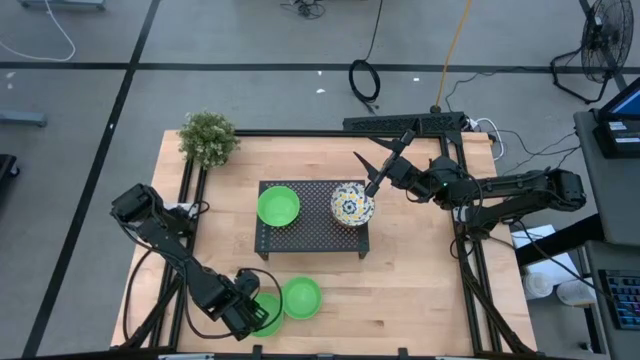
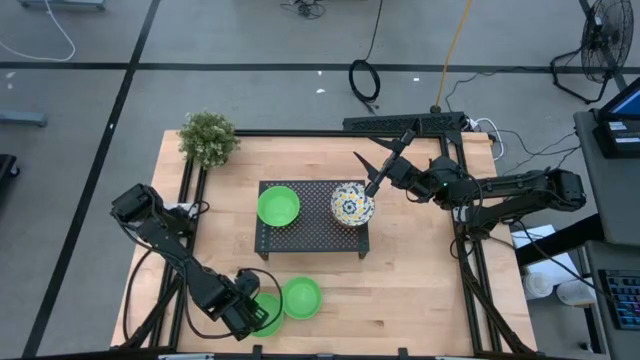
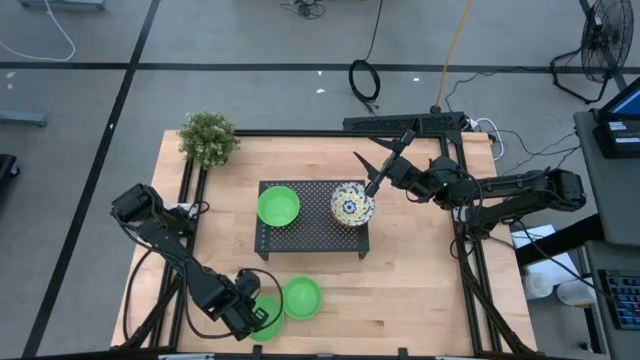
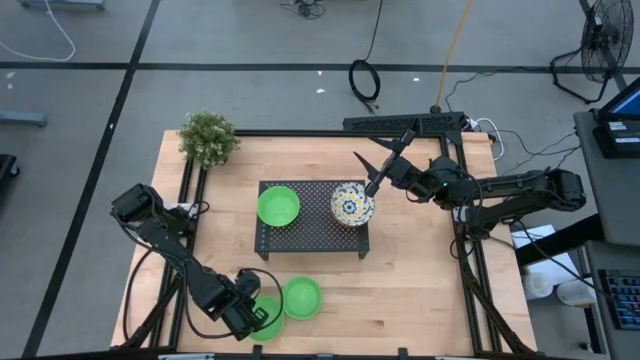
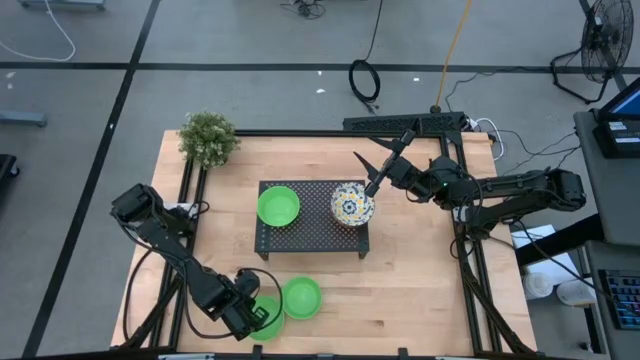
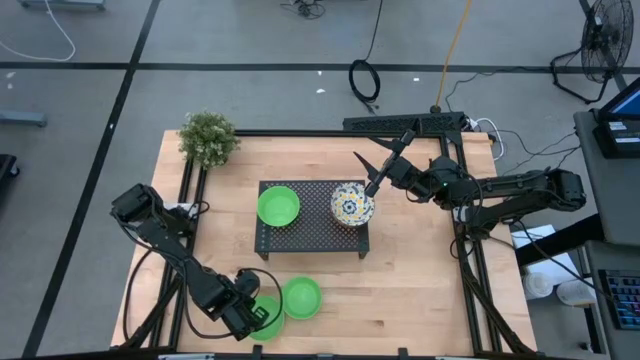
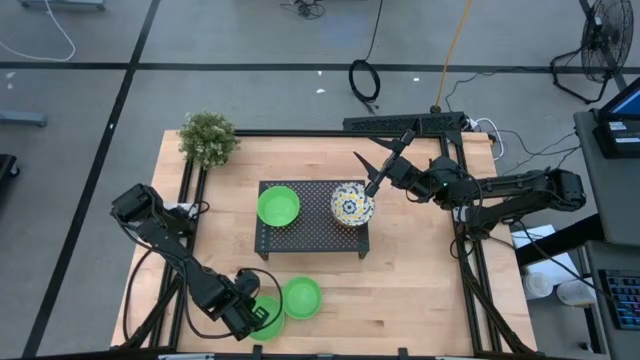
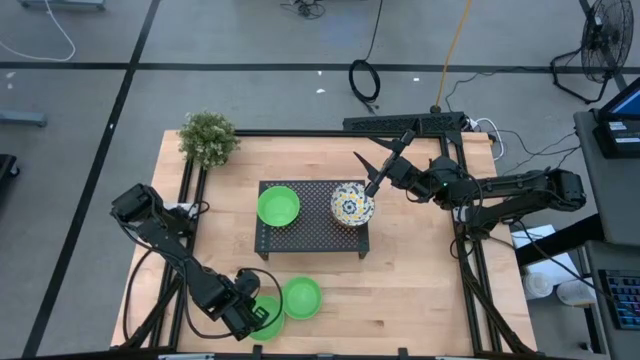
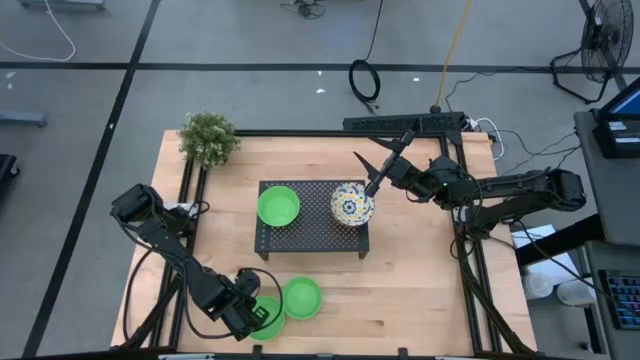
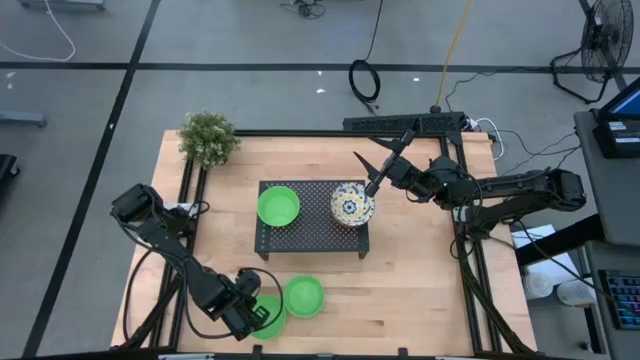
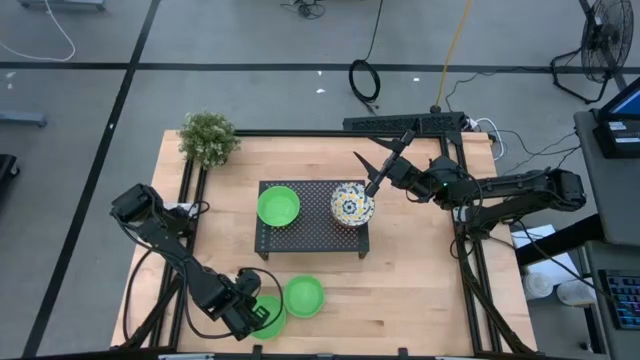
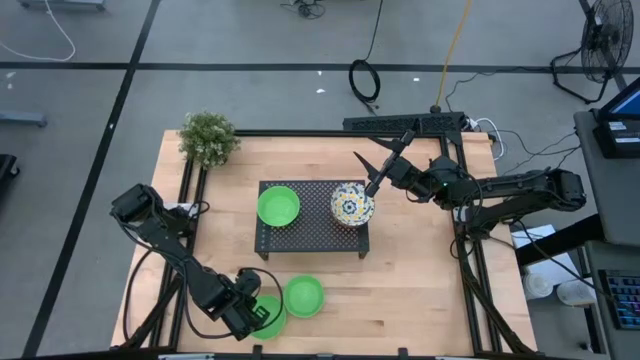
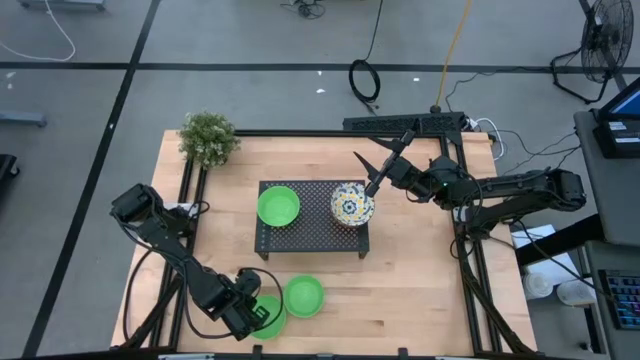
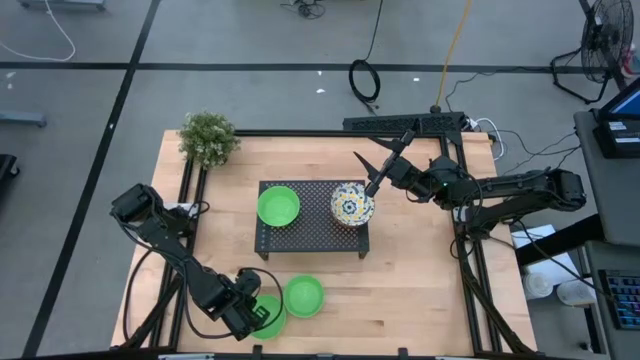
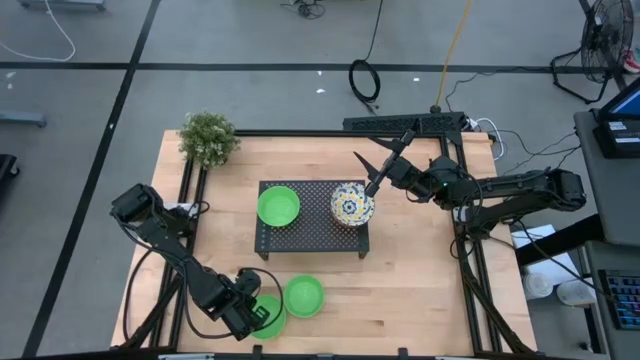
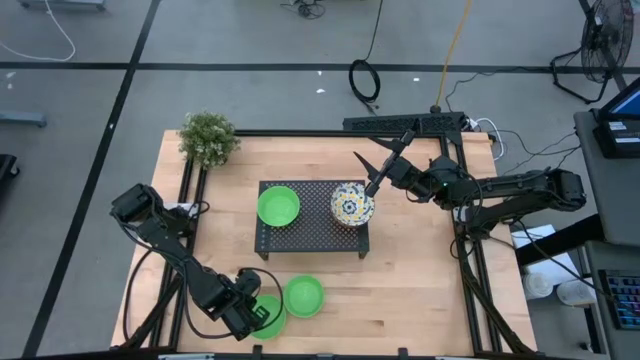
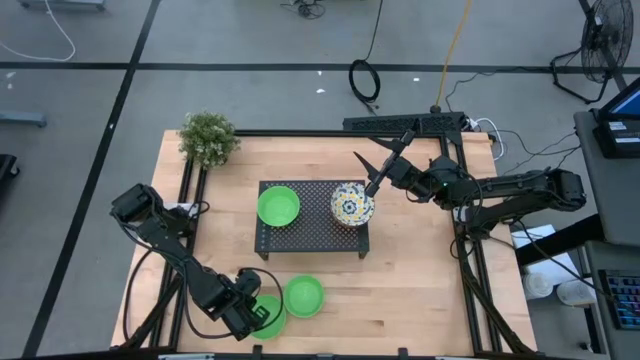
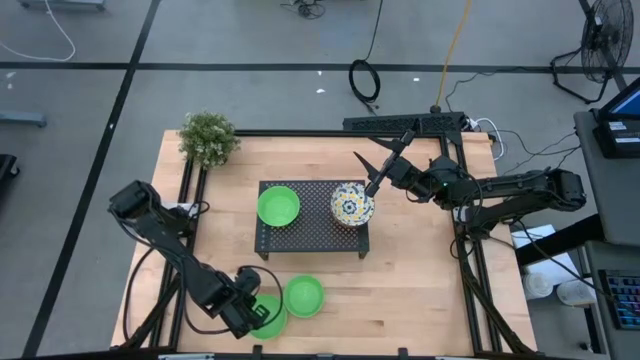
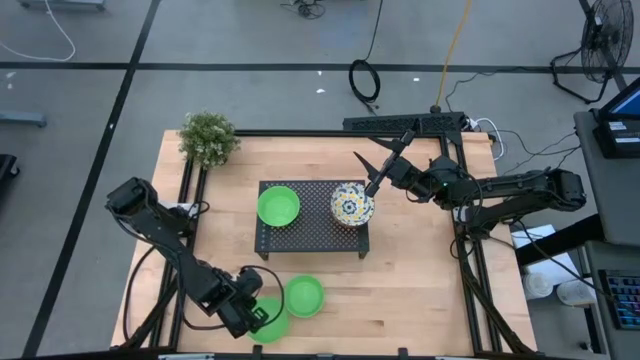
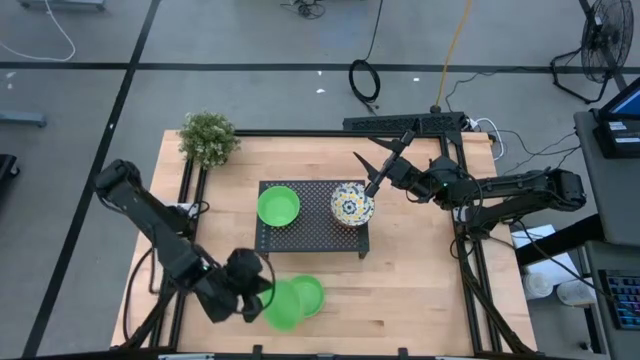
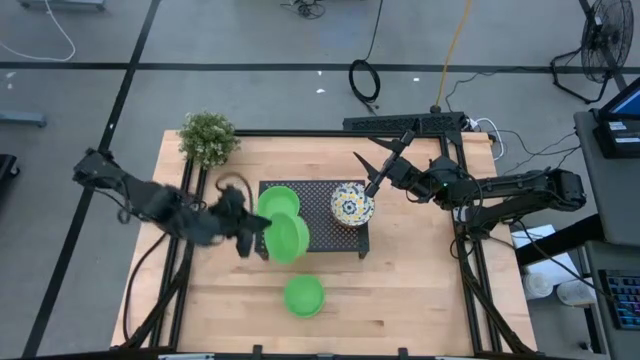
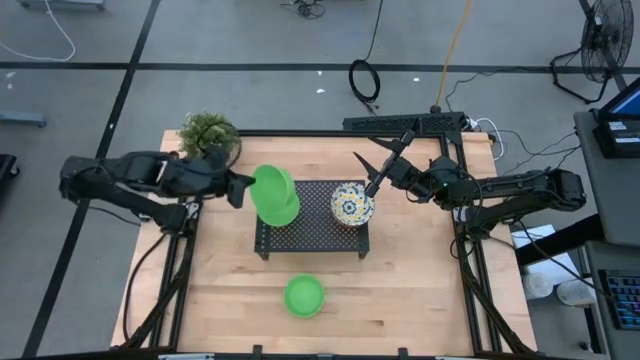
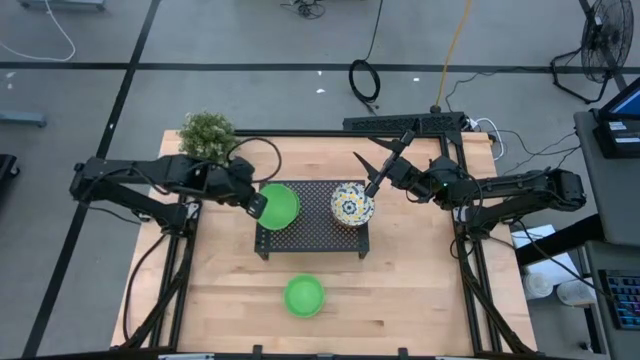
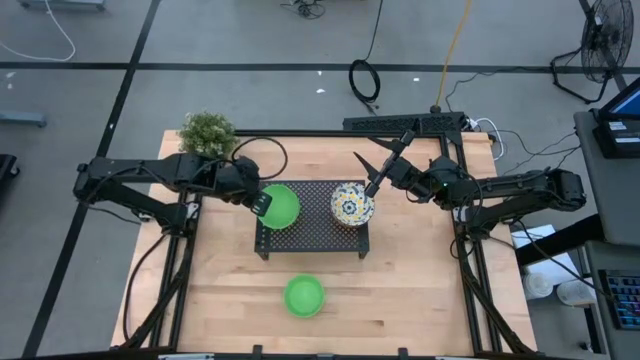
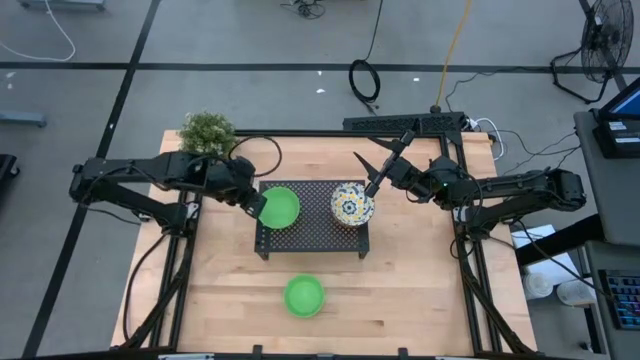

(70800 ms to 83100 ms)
Task: Pick & Place Mini bowls
Stack the left green bowl on top of the green bowl on the shelf
